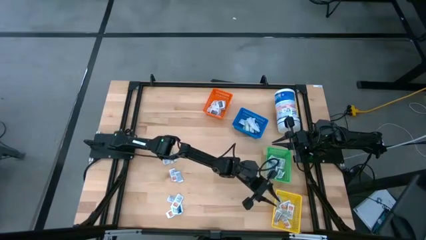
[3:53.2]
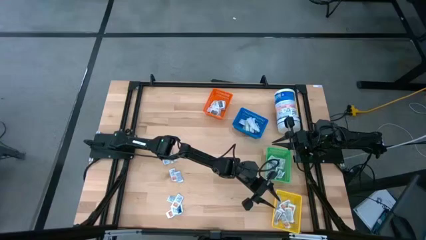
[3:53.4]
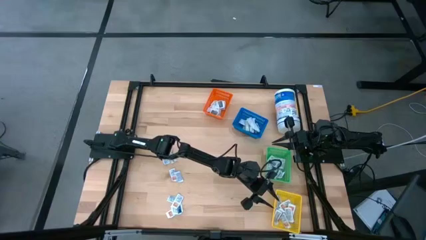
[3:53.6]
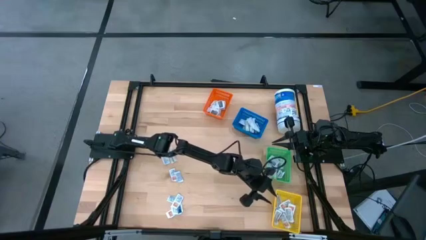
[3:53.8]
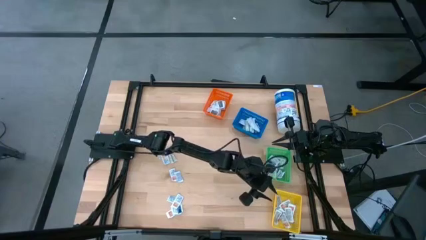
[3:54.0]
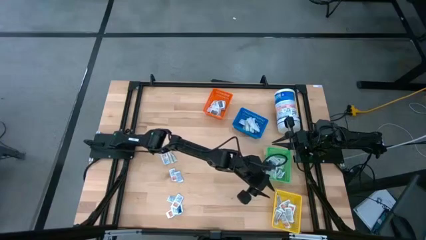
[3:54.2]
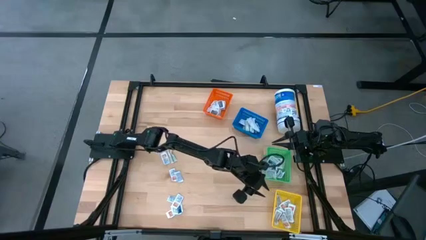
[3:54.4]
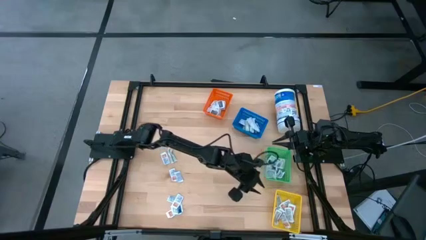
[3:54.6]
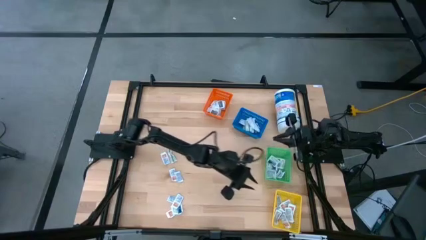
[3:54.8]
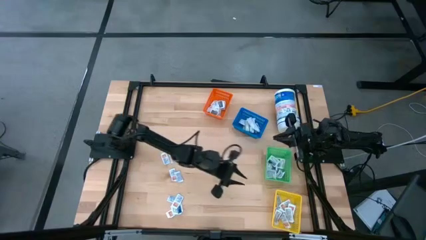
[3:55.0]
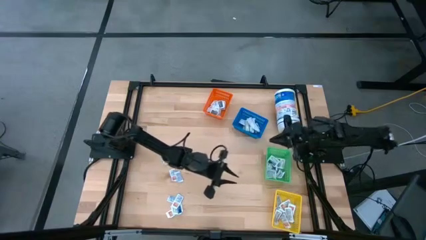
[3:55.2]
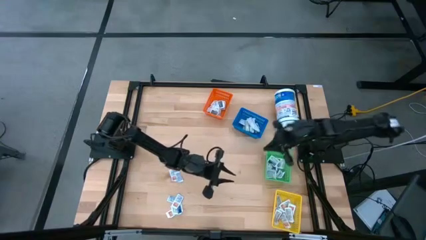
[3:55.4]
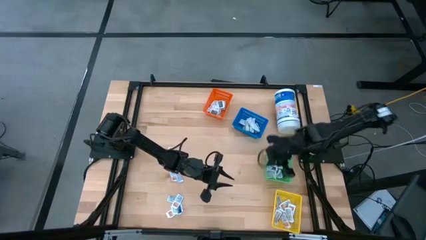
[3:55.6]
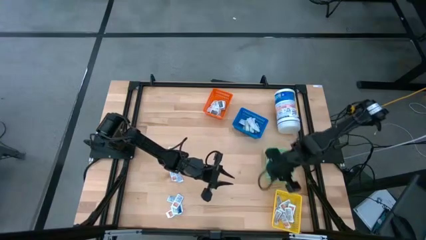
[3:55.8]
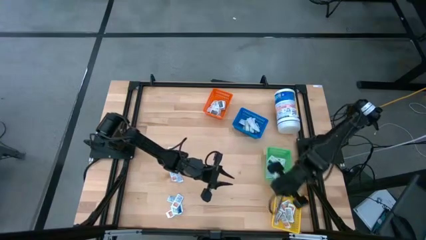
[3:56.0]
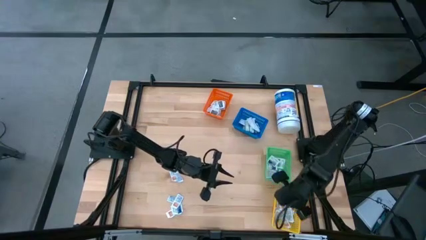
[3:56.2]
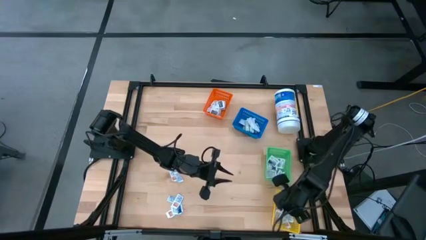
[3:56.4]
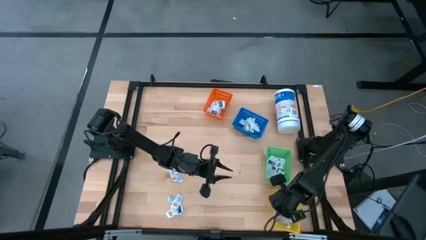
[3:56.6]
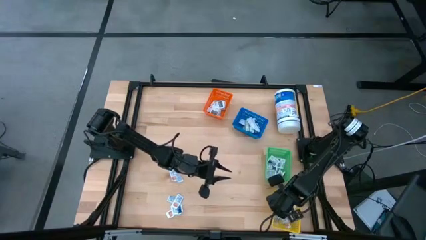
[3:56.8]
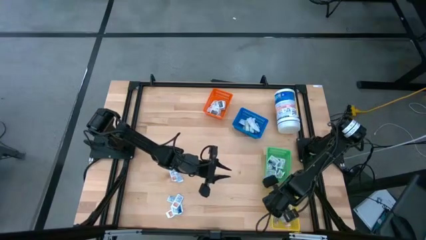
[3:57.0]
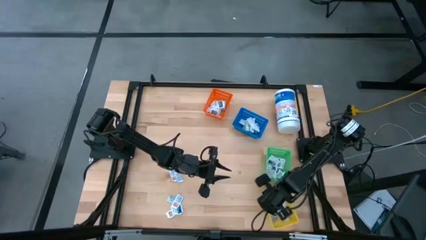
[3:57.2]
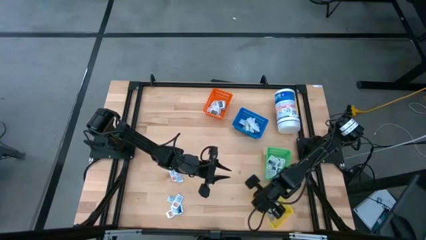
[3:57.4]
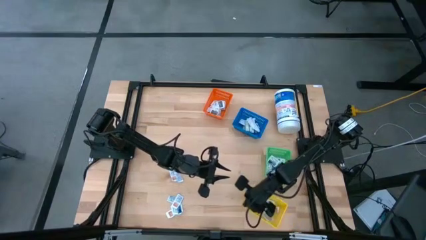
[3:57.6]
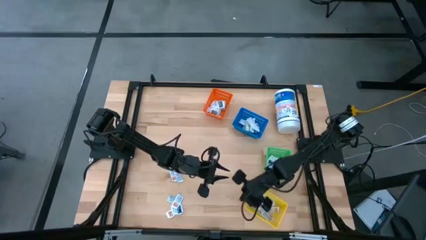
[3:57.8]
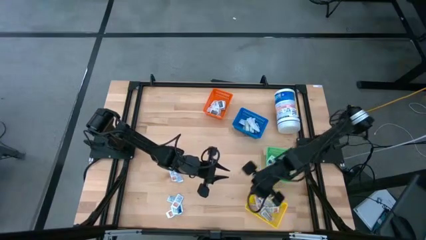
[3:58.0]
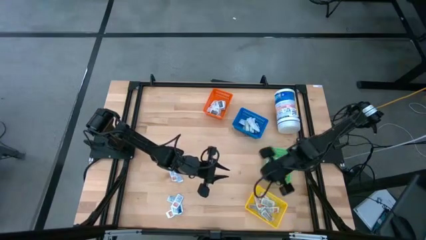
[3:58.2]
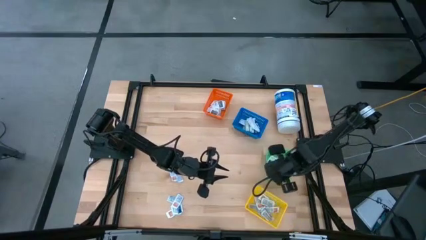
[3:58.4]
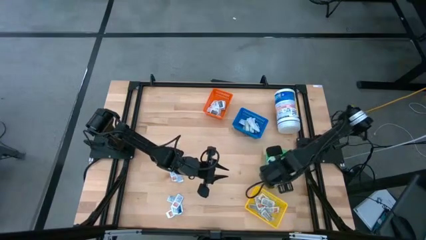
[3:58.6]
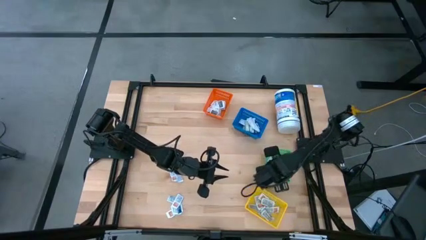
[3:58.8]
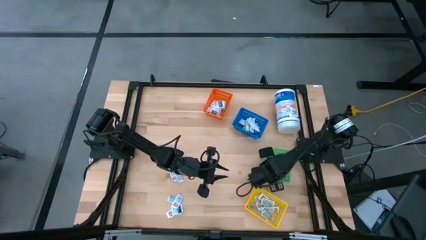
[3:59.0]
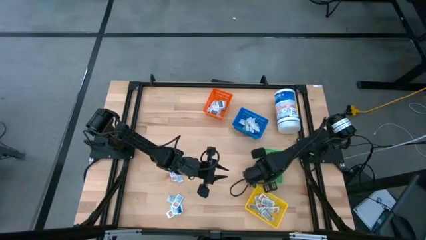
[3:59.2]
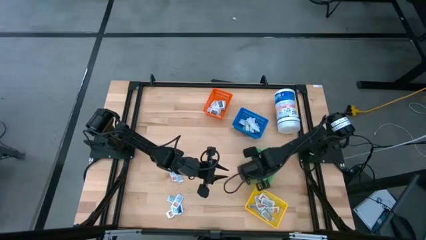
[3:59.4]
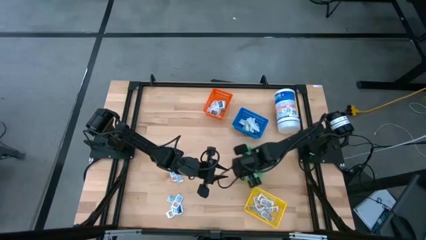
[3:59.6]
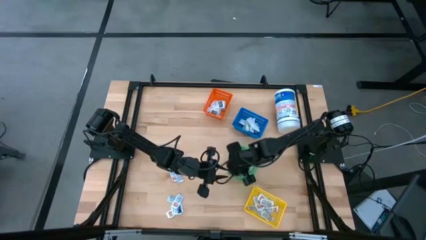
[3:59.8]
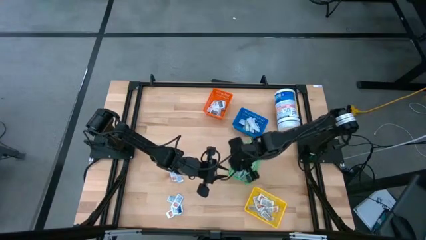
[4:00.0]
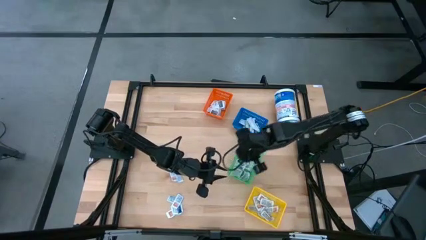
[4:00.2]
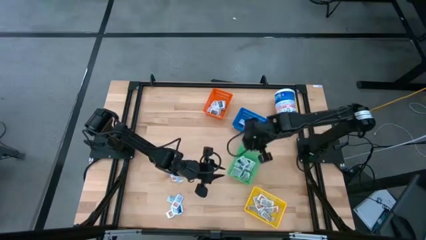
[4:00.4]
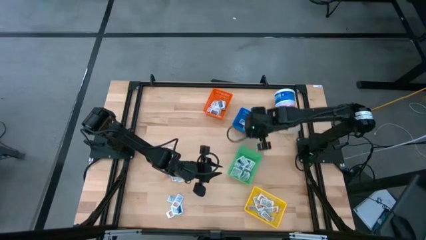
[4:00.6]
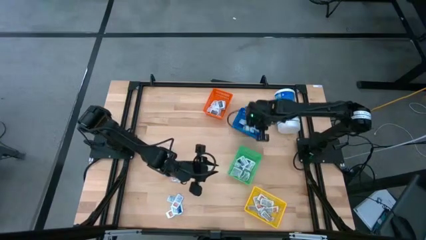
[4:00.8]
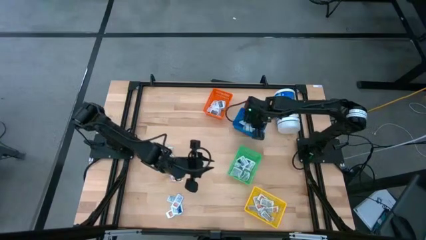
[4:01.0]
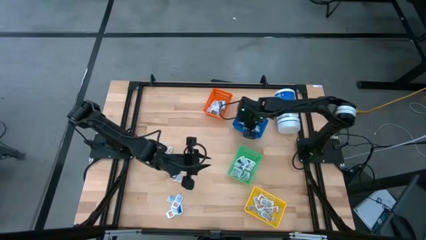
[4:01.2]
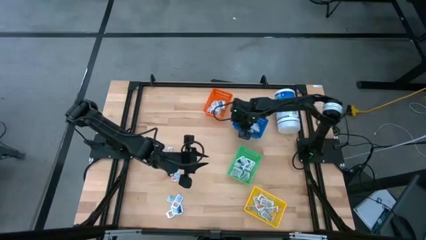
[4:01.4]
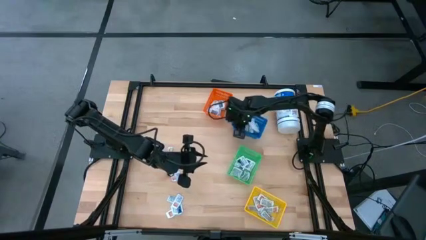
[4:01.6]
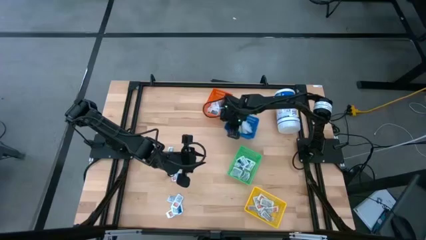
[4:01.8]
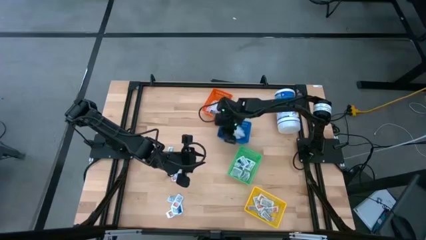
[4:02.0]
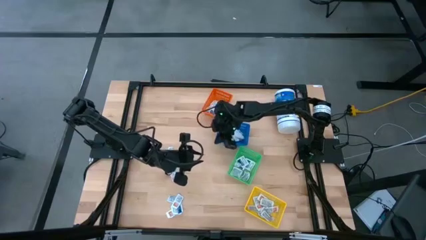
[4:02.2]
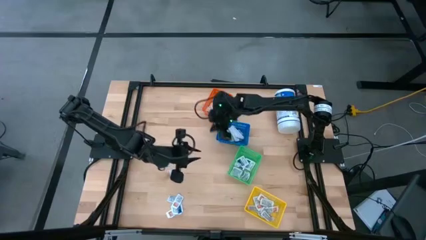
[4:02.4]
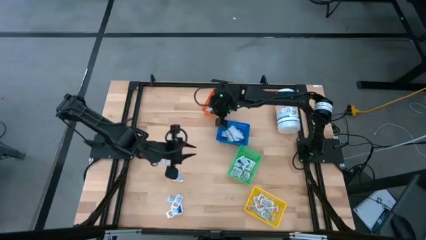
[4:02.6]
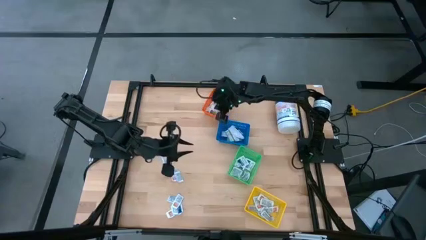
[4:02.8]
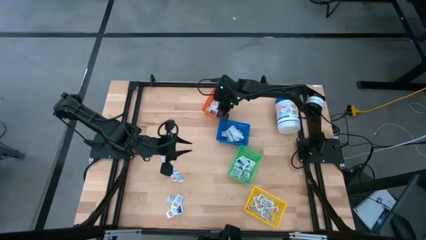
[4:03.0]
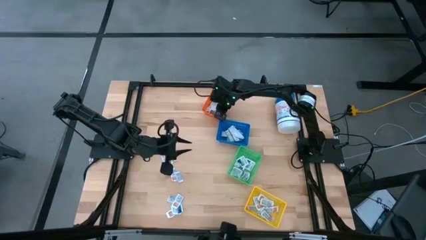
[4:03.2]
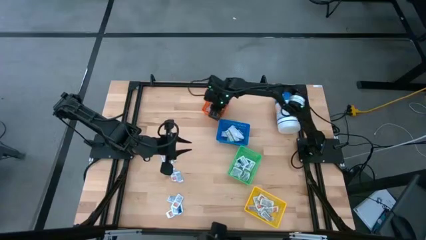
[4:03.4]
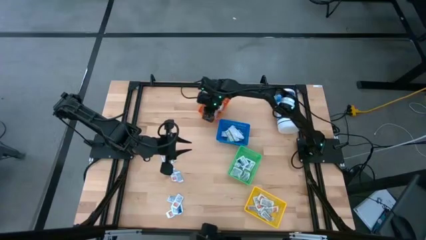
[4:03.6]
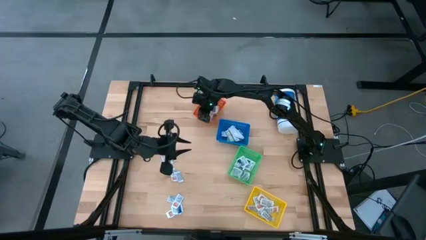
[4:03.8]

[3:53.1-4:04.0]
Task: Pick & Place First Aid Supplies
Adjust the baskets on the table

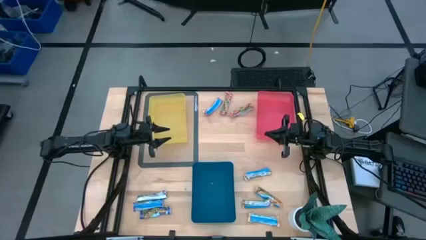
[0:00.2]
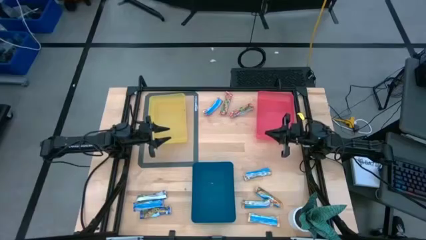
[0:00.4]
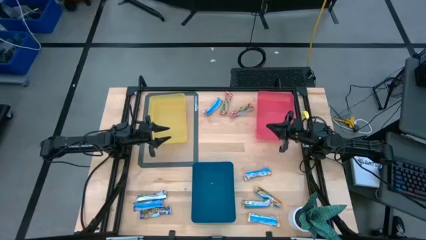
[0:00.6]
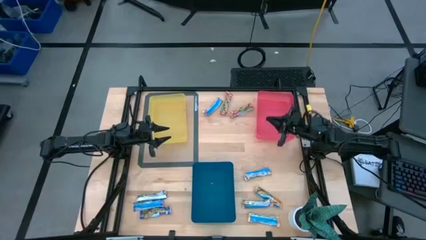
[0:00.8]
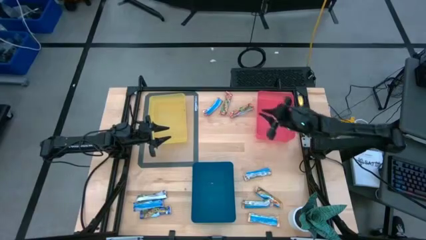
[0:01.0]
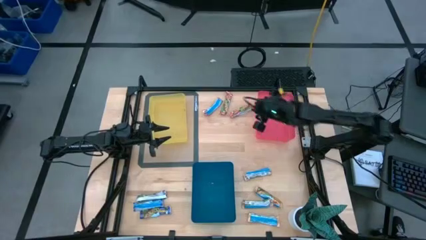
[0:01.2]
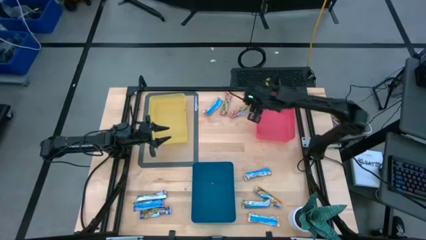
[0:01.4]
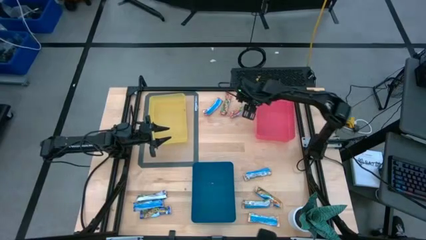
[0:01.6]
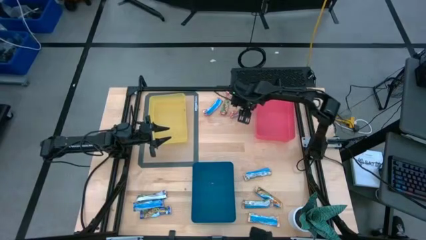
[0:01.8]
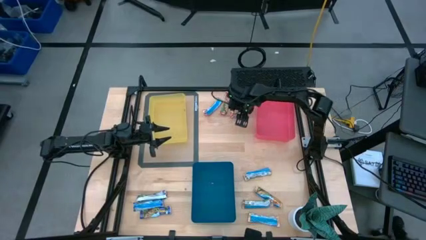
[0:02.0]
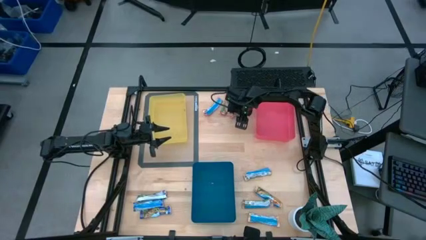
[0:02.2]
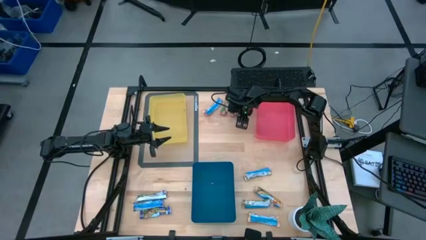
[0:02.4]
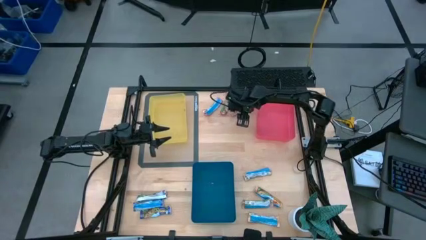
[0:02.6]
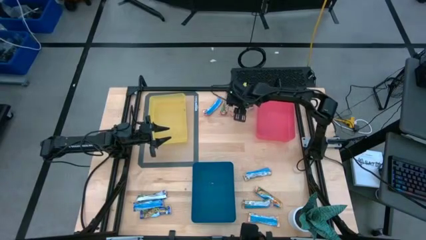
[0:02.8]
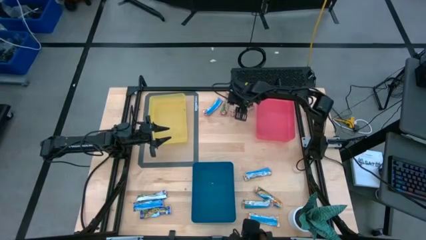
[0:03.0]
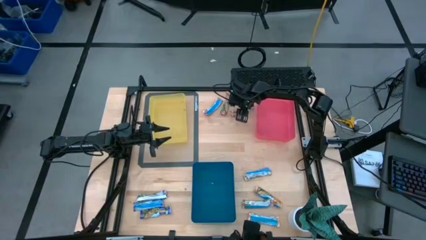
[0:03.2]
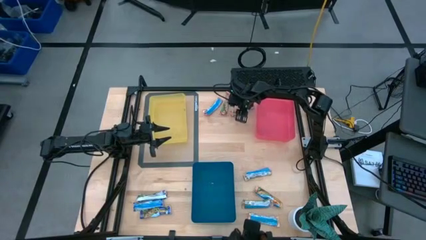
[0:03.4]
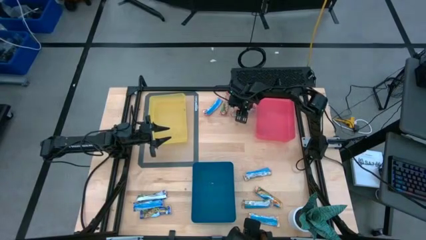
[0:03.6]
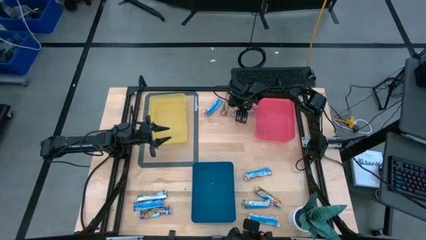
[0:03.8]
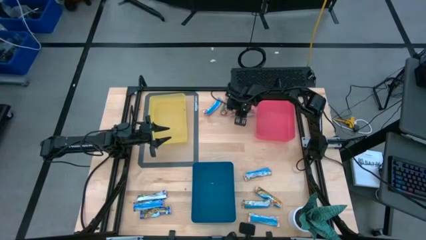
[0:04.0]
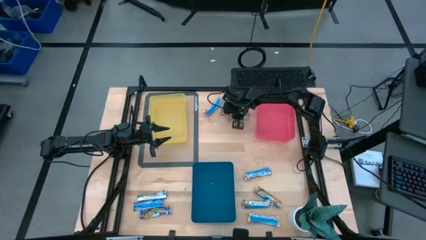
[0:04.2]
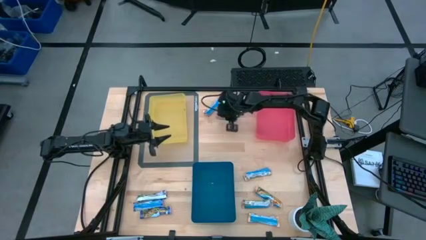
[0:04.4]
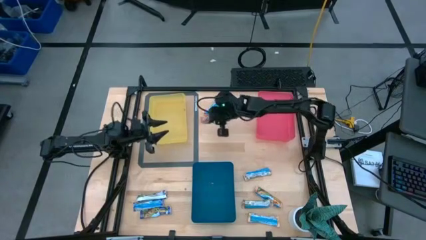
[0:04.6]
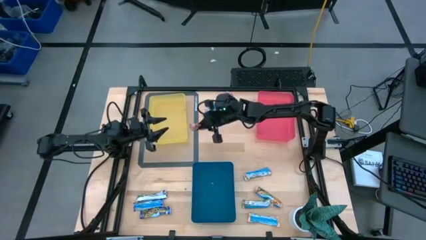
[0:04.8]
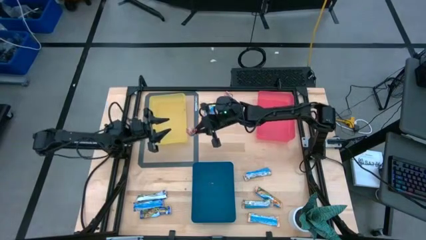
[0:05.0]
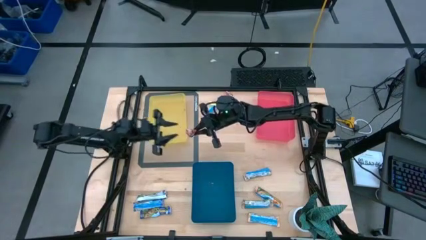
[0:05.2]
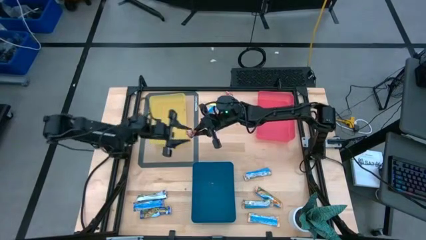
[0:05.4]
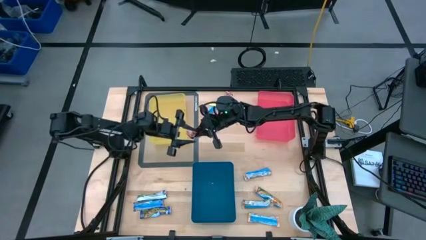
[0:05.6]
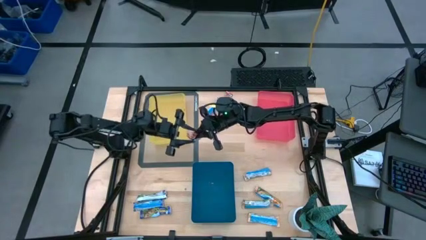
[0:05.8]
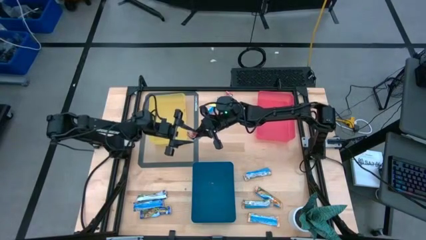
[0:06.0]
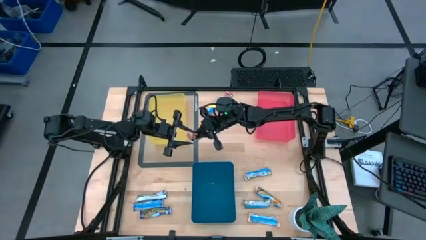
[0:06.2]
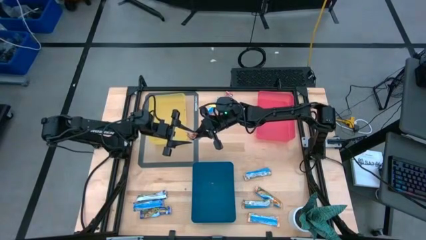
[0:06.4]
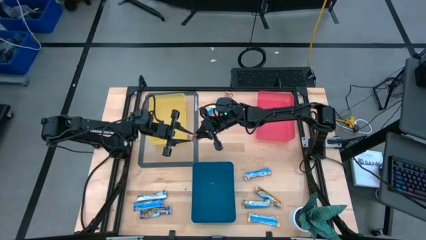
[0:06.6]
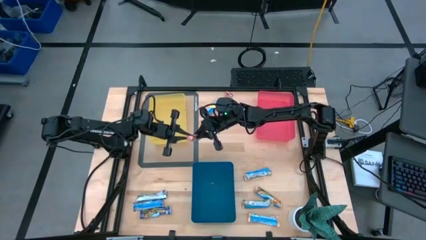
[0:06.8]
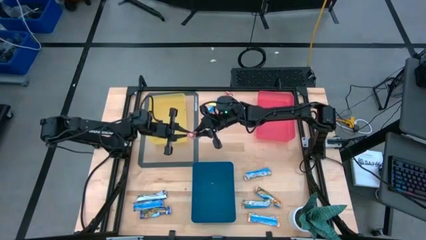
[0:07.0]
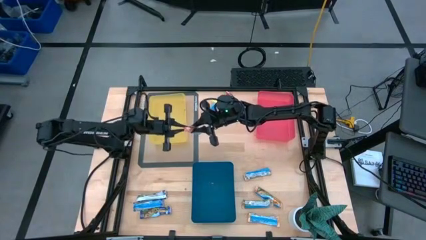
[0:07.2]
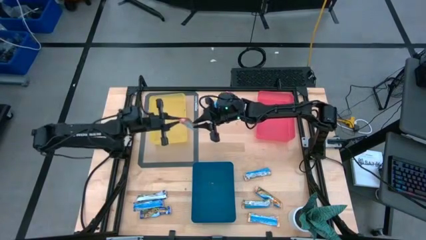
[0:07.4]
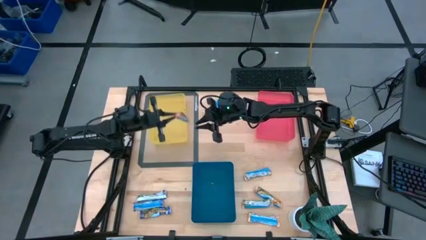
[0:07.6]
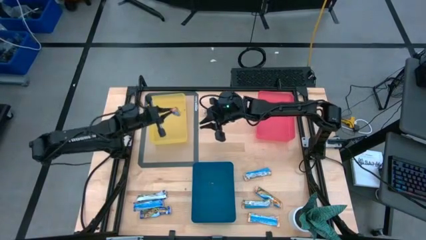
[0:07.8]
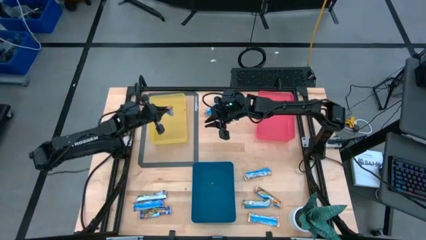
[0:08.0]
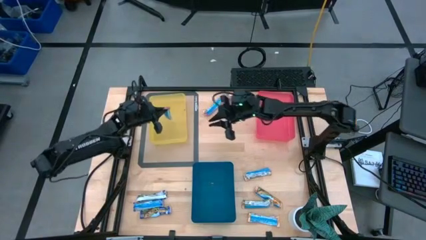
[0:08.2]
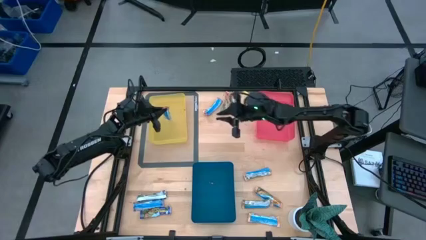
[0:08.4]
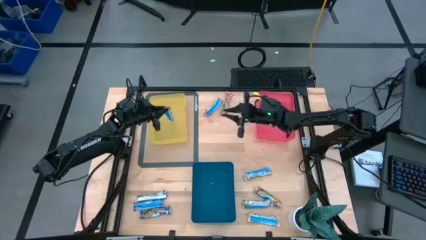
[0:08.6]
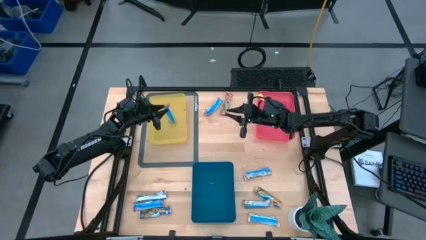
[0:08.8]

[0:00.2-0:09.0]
Task: Pick and place Granola Bars by type
Put the red granola bar into the yellow bin
